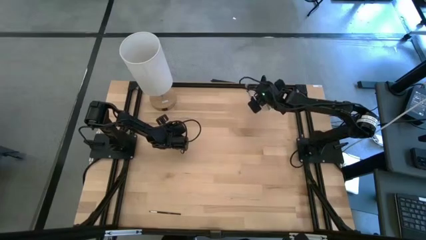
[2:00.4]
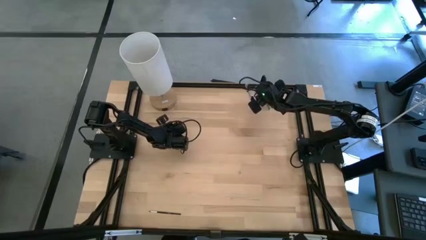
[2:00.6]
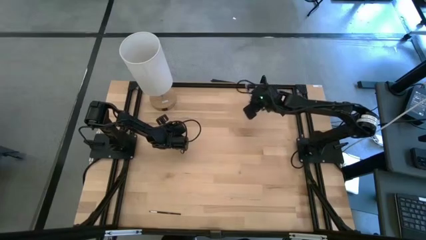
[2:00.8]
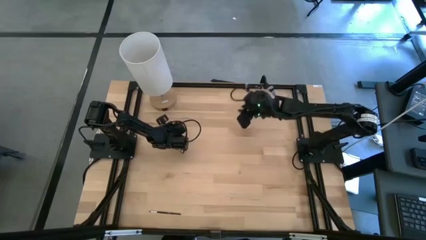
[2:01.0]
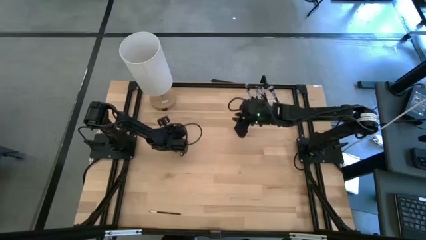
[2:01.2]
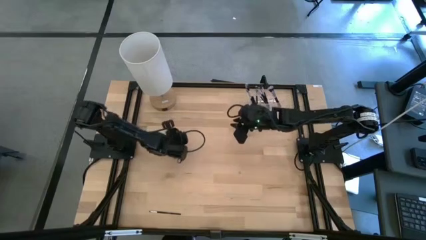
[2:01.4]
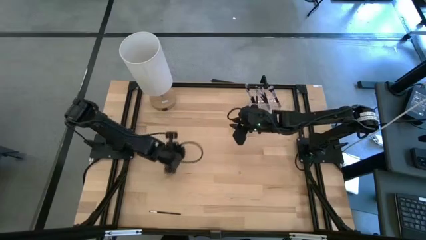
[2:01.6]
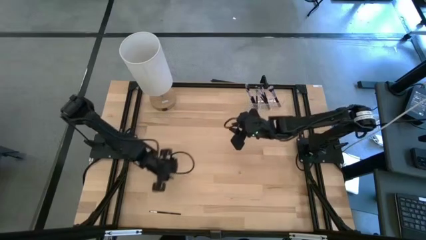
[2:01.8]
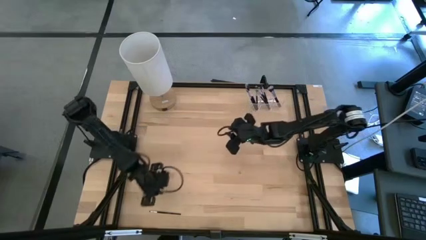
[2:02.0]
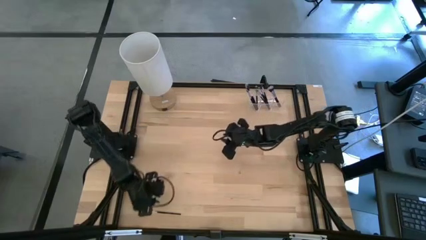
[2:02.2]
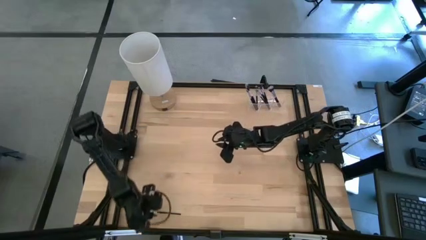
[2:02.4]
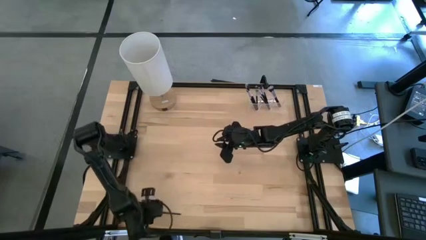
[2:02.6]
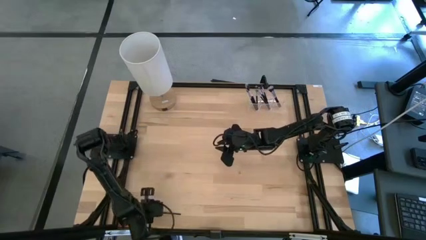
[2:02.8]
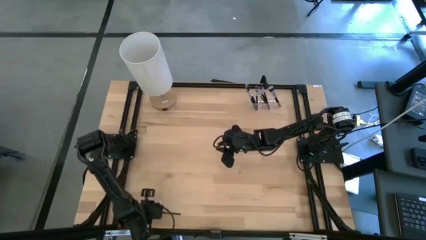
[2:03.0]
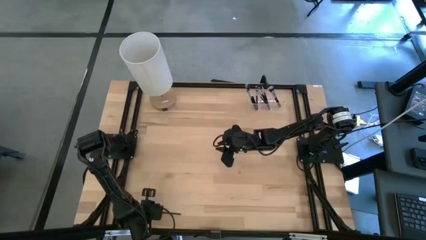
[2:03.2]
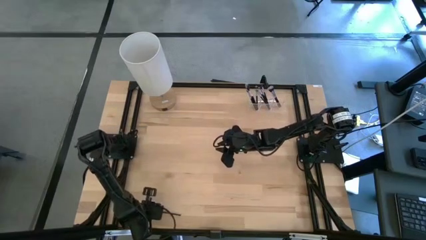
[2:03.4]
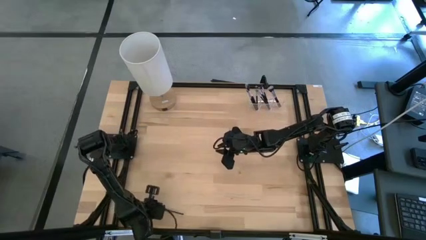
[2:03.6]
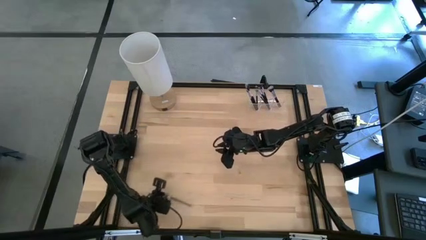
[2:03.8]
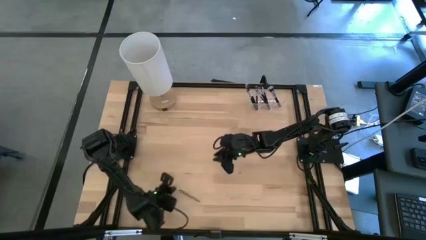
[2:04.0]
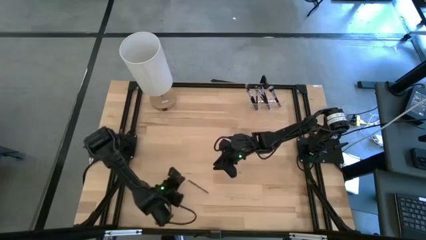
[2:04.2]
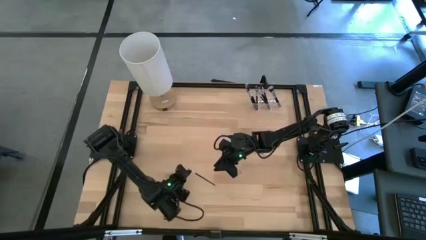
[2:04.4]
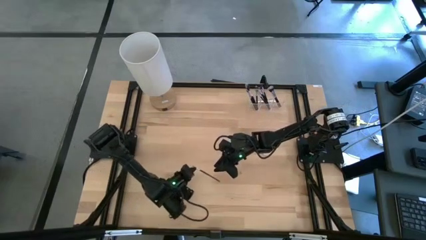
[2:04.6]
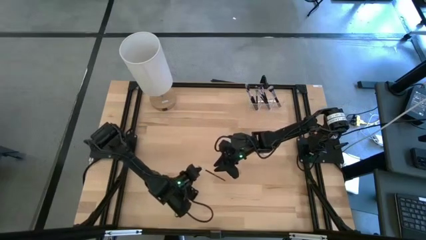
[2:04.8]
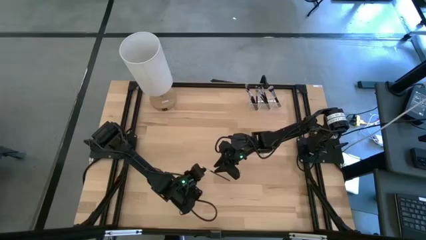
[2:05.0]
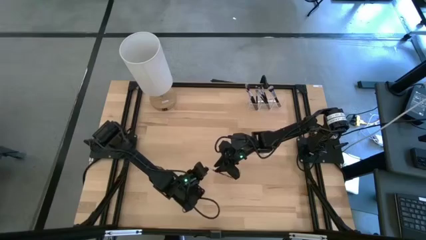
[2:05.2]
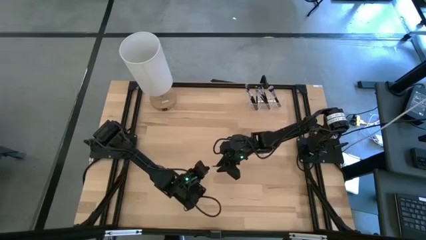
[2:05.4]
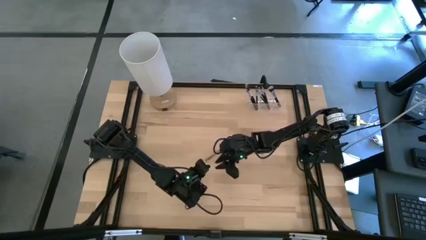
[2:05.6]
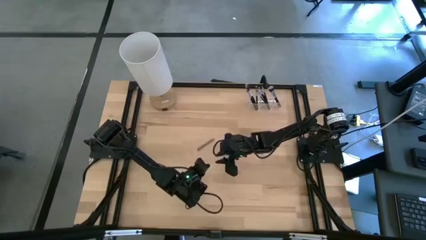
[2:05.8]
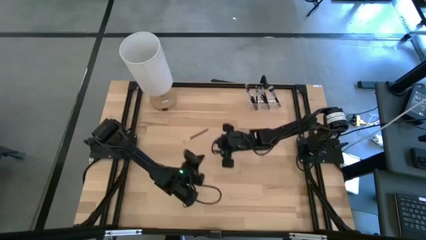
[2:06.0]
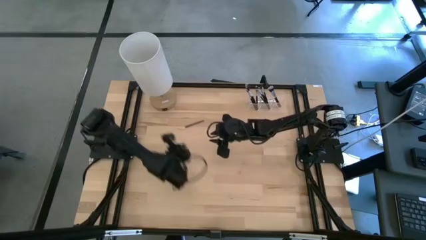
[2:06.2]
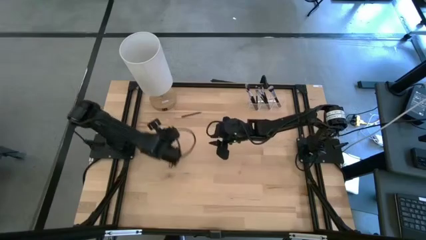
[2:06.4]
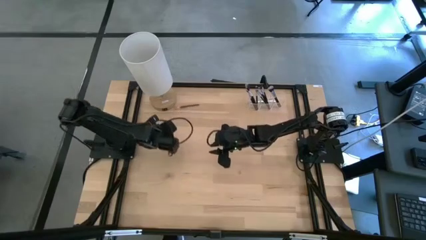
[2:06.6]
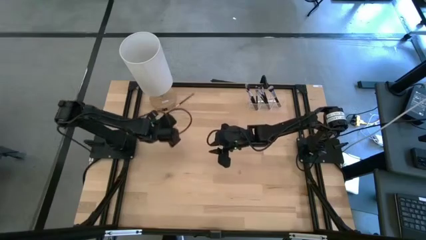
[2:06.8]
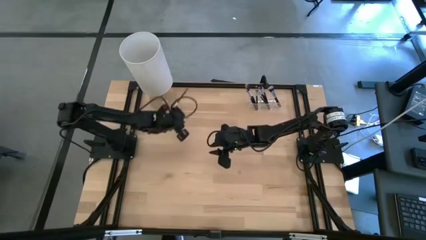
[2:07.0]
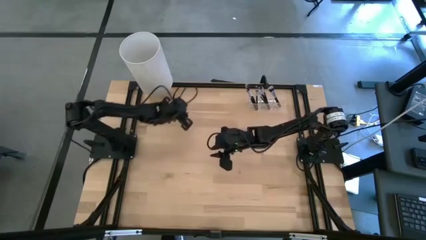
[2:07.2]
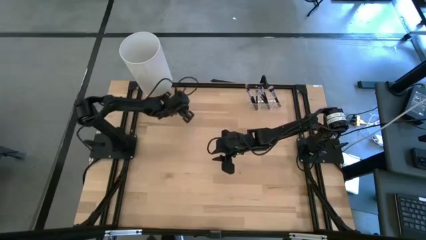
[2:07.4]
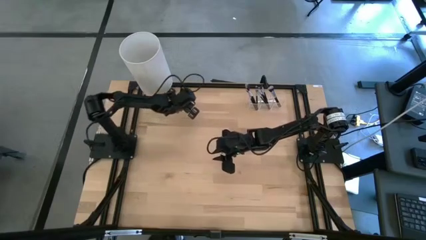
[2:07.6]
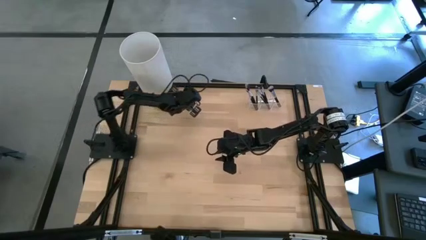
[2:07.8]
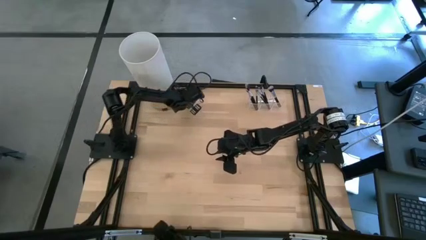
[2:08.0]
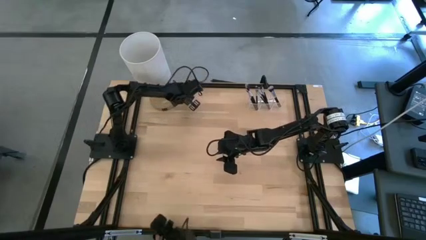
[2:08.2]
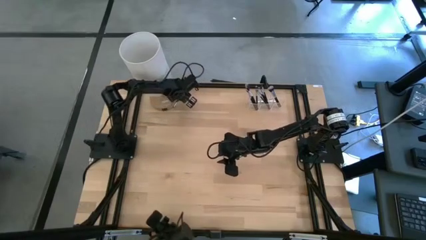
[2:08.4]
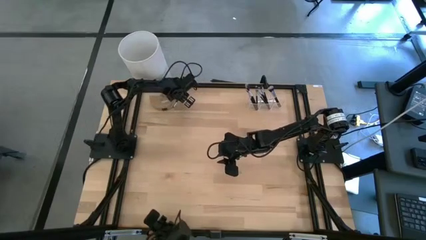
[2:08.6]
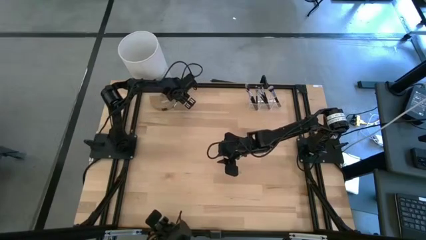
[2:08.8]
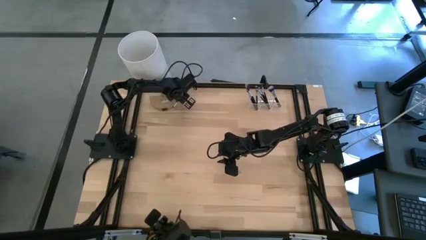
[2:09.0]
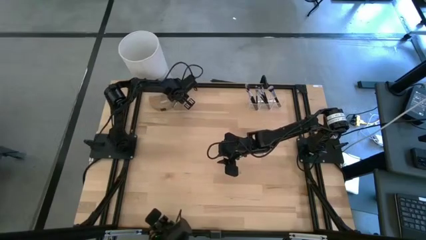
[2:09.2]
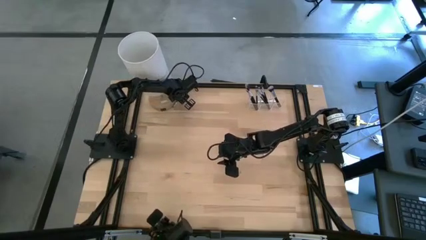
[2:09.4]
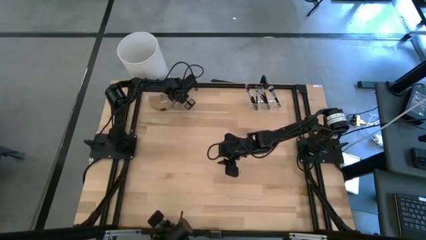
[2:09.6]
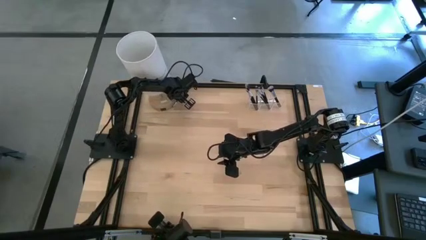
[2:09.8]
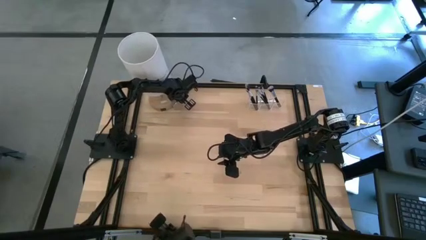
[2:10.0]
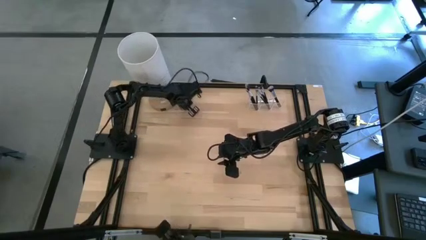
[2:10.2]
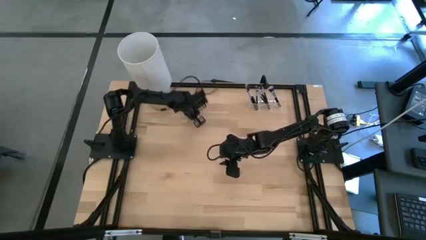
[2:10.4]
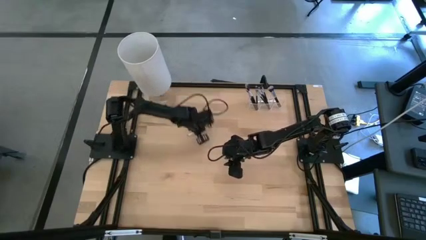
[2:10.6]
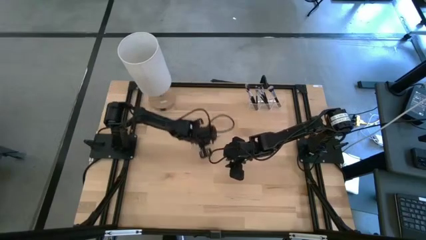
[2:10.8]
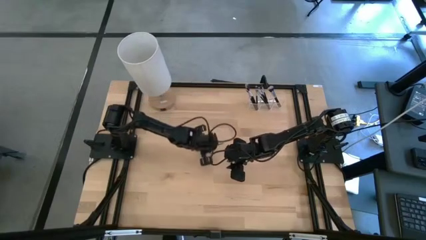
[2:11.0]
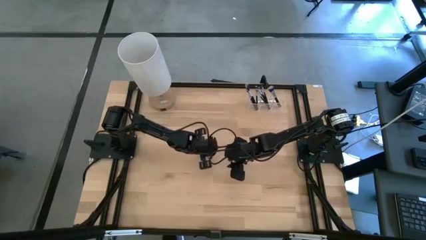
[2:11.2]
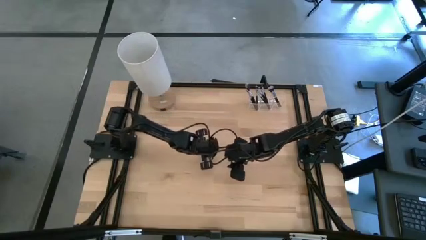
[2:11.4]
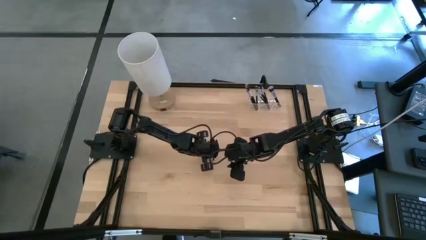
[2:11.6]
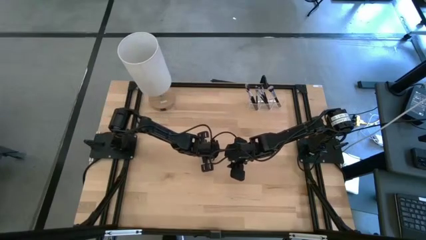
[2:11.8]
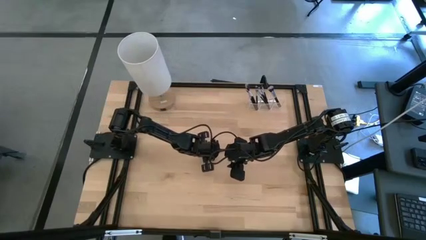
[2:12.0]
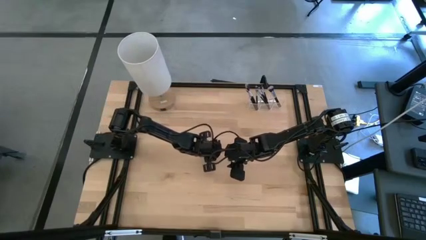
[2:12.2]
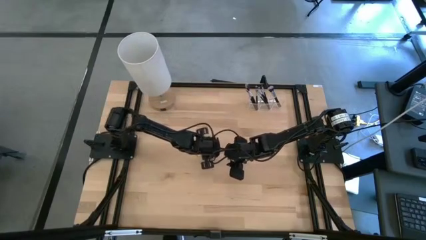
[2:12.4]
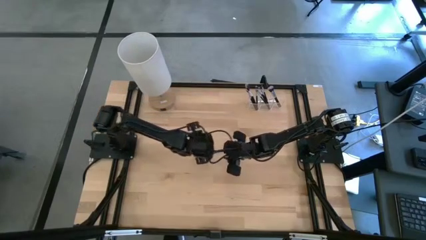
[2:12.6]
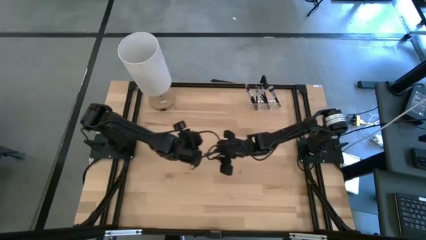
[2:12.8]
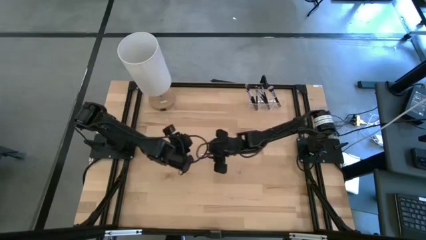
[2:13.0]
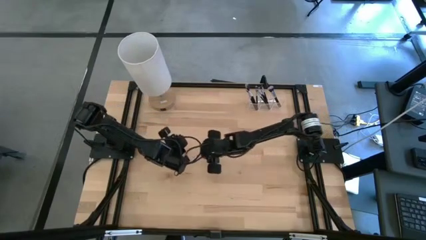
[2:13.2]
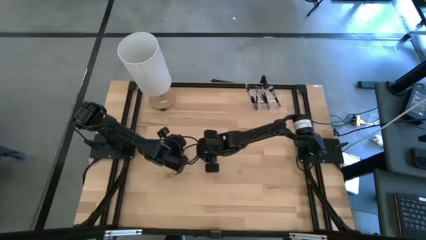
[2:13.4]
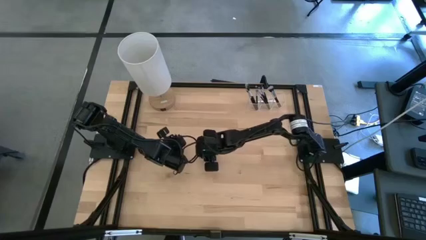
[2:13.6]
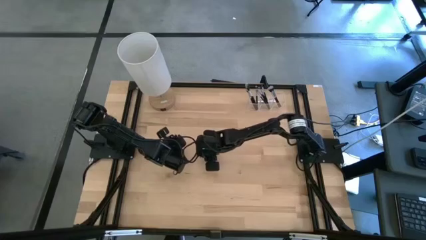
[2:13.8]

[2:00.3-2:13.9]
Task: Put items in baskets/containers
Put the eyeshadow brush into the middle of the transparent organizer

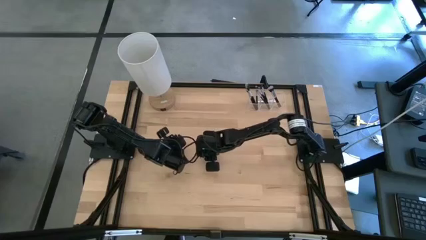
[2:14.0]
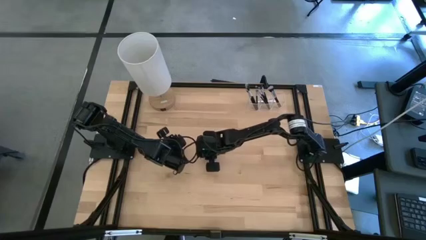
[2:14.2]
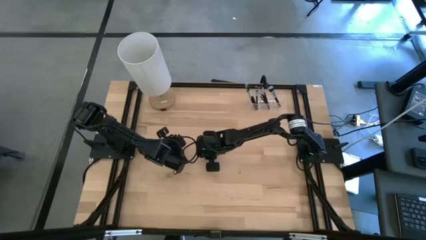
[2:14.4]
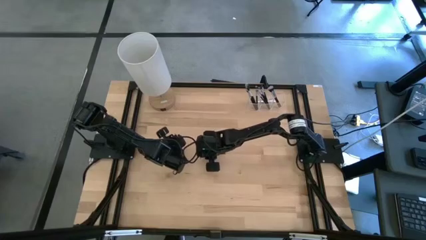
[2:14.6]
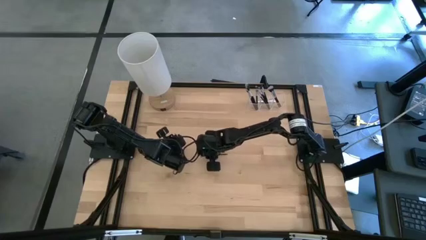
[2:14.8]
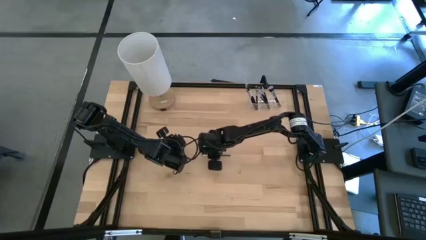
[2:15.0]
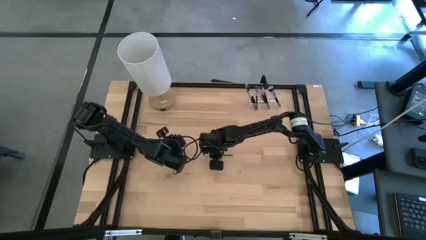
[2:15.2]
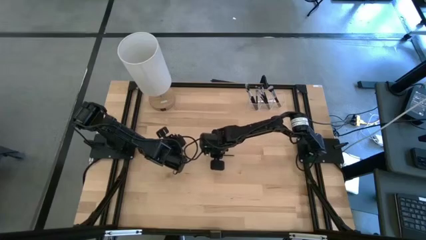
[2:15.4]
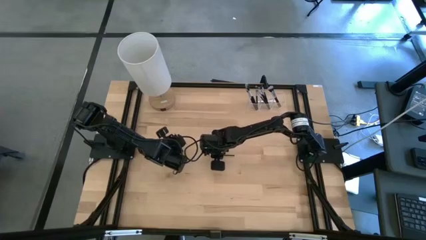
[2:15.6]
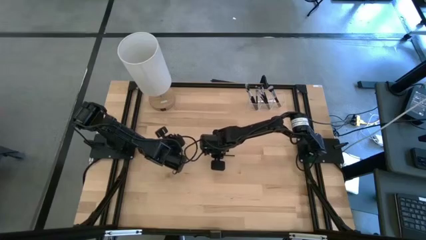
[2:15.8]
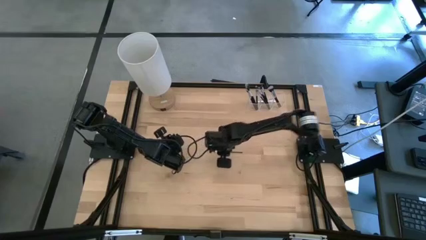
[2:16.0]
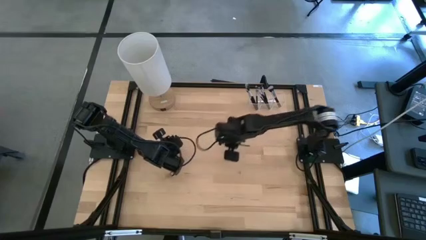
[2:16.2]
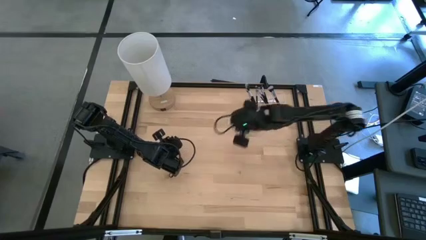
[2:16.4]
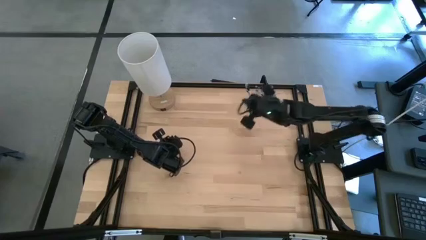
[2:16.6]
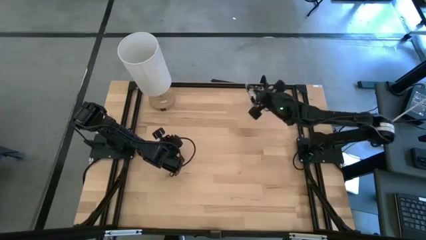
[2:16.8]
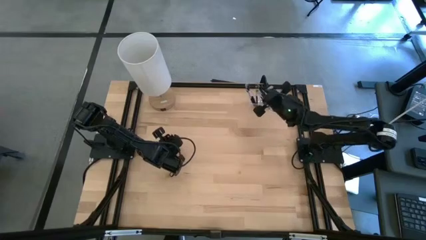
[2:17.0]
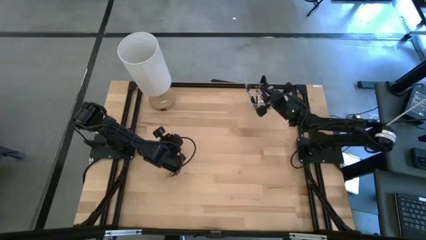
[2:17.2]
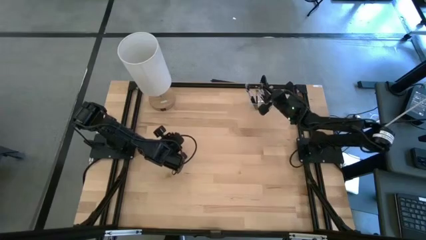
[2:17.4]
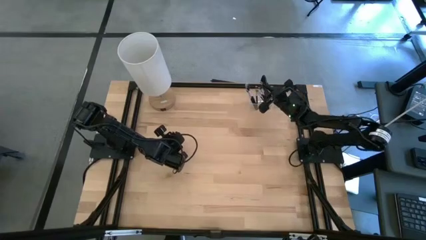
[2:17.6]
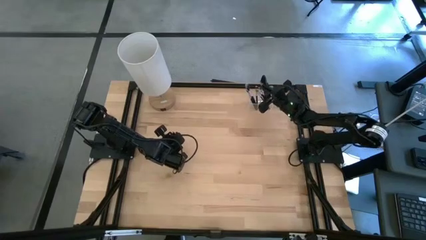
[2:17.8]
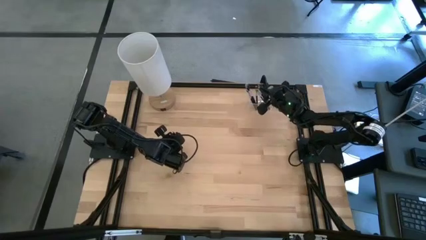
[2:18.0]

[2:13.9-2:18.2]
Put the eyeshadow brush into the middle of the transparent organizer
